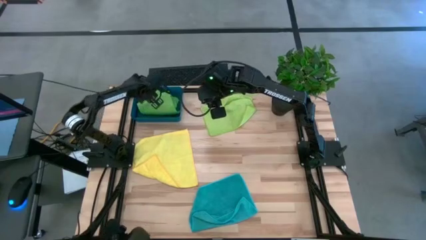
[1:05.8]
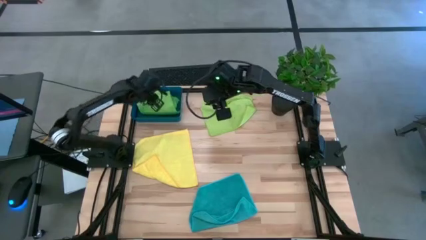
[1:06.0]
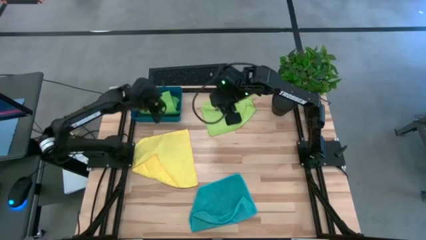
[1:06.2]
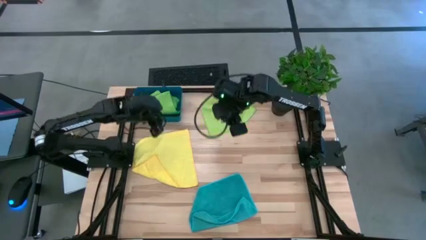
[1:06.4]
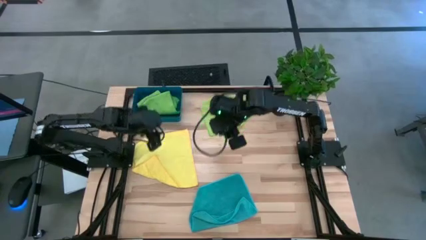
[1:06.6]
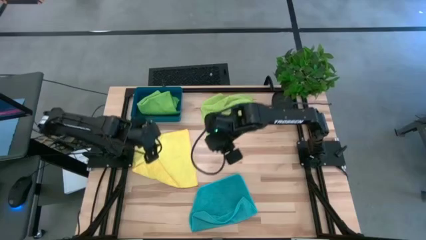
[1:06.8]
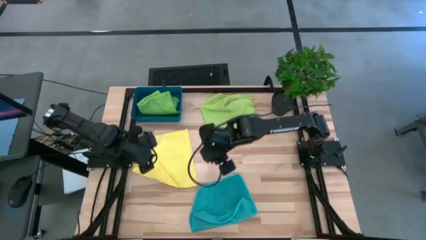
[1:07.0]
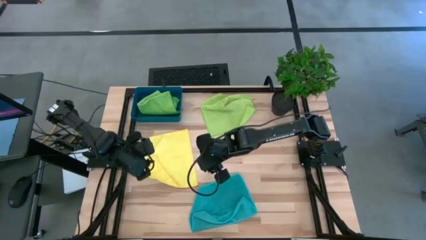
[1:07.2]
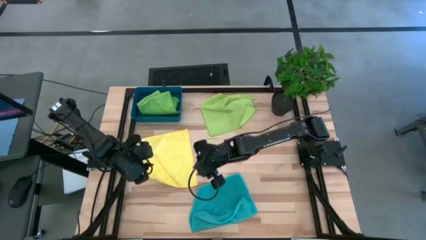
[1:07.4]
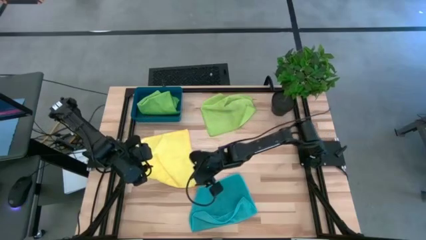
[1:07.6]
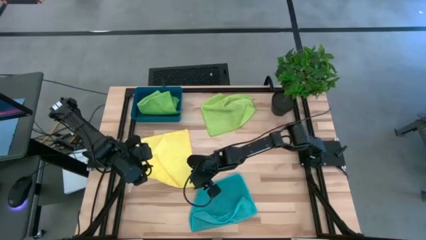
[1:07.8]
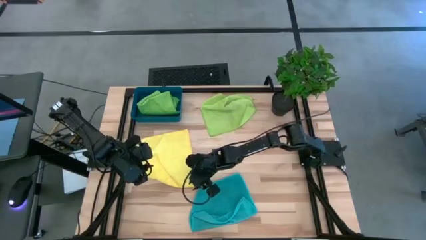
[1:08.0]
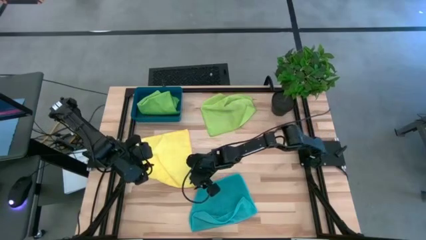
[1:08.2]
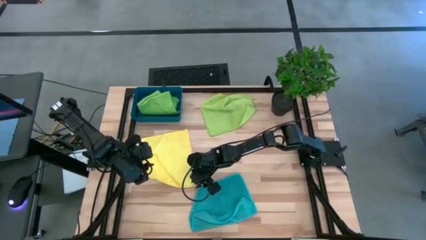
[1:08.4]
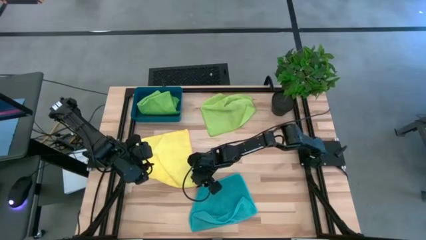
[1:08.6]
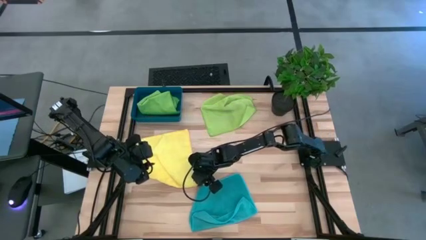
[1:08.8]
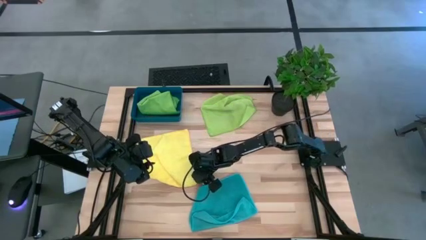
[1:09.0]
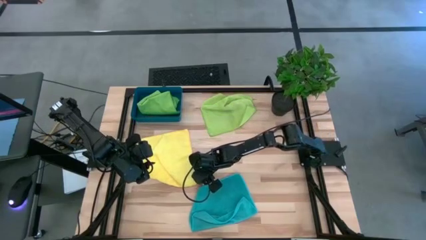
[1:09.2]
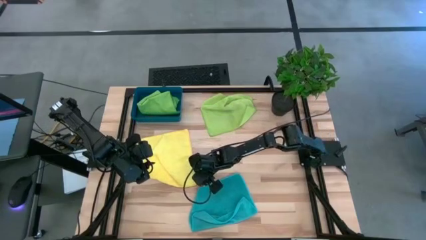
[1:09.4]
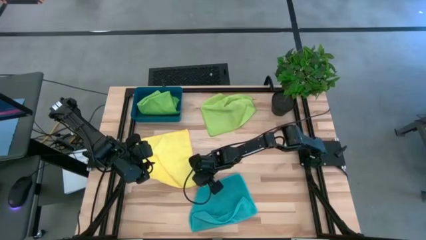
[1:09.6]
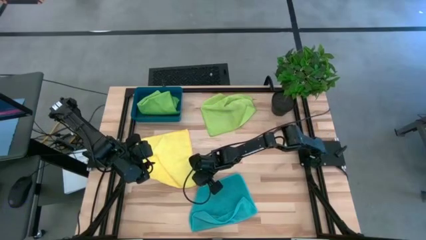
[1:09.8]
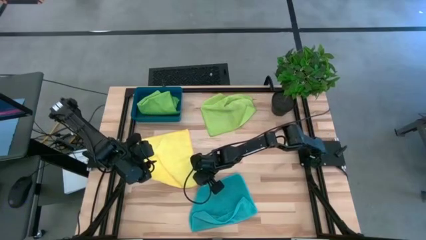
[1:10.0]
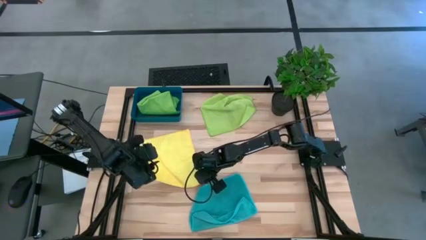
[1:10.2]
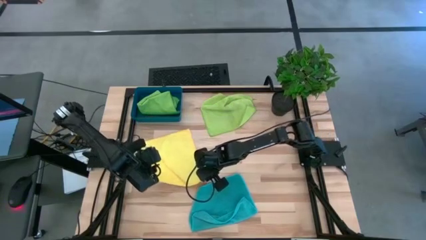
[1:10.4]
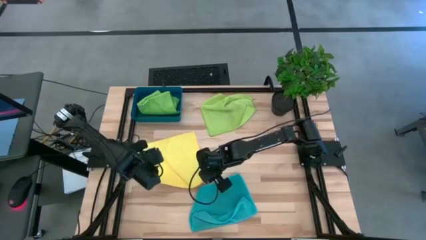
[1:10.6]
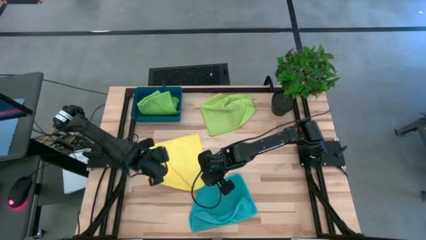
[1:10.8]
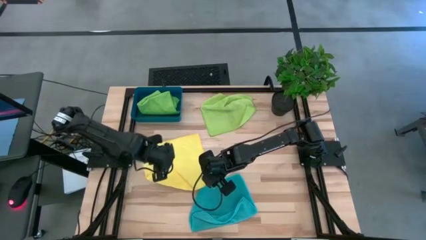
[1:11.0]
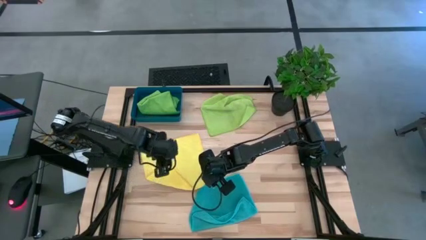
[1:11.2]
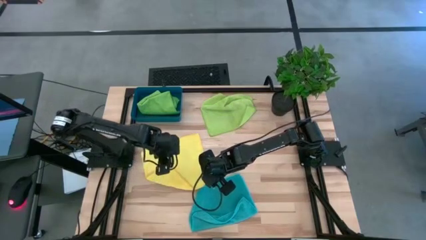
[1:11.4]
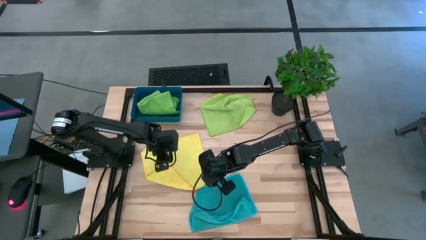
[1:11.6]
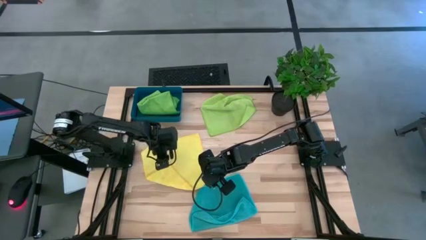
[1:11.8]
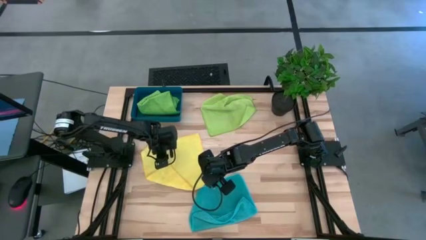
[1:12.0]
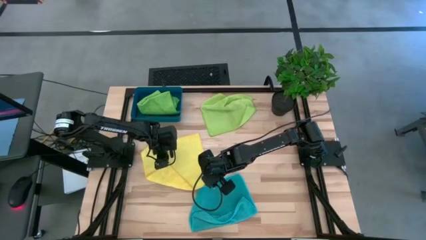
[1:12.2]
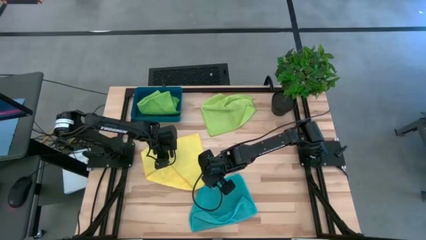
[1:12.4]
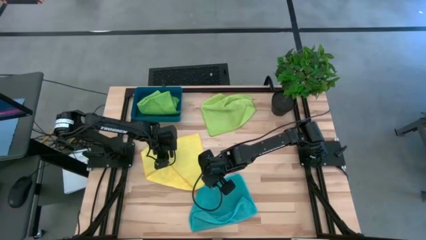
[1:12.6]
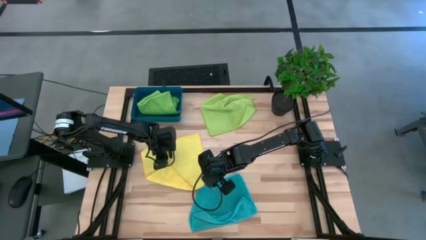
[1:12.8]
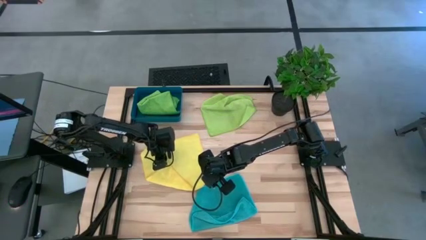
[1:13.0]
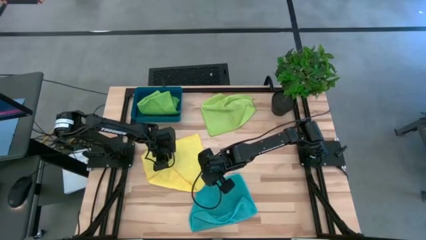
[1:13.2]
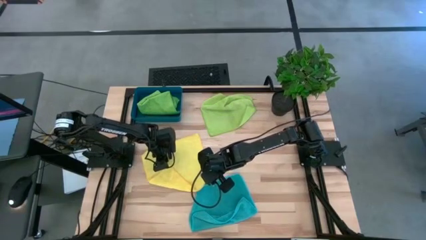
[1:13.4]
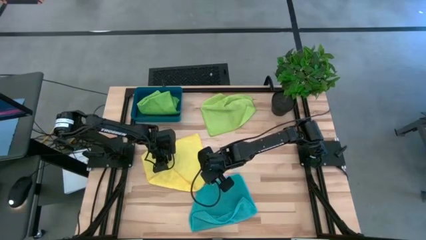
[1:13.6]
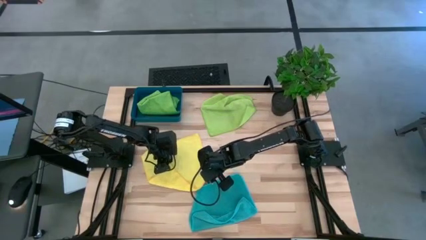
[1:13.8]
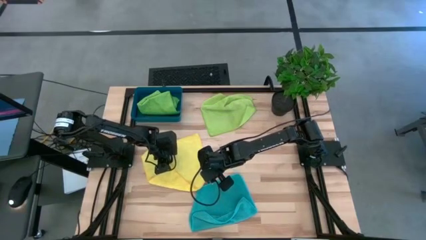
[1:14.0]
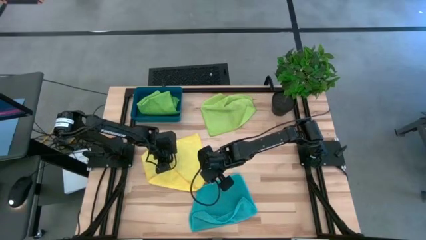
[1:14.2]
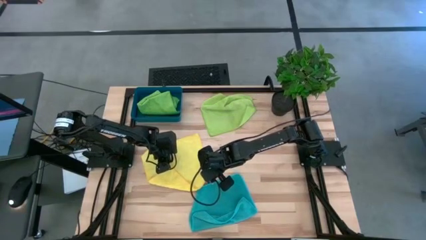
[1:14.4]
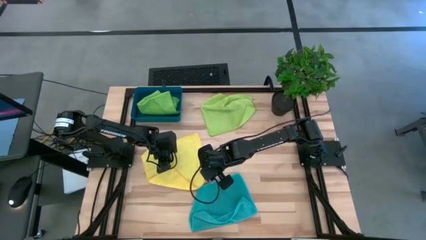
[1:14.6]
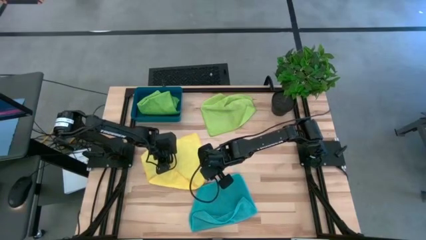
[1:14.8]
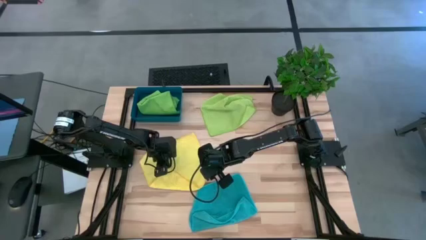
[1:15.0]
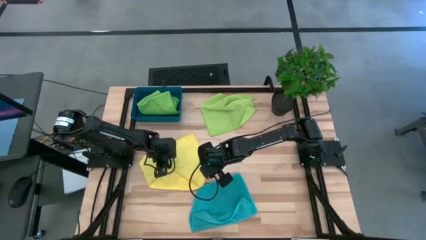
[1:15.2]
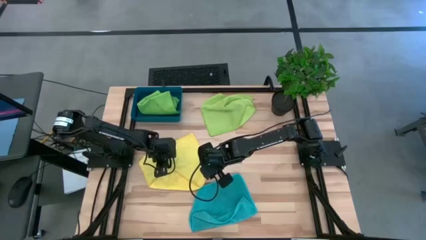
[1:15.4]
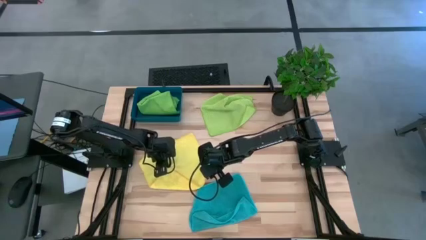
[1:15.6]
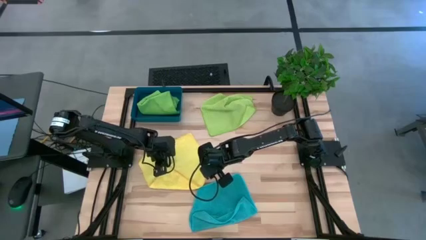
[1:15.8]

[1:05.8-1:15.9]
Task: Fold microfiber towels
Fold the yellow towel
